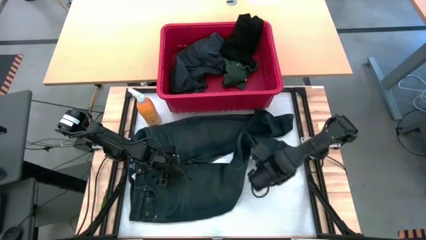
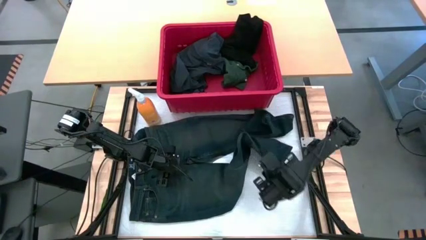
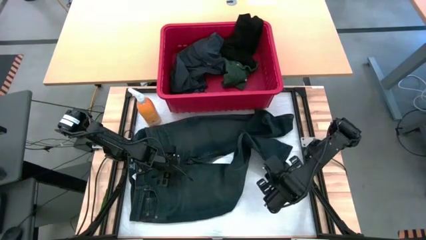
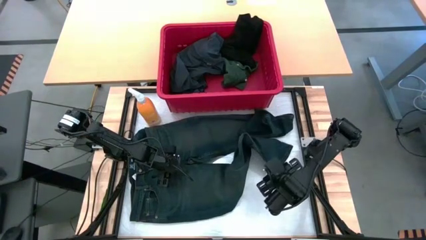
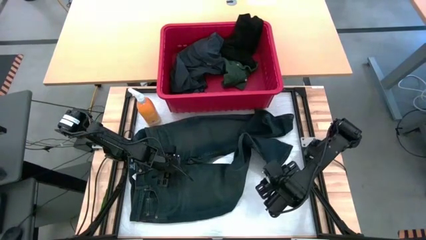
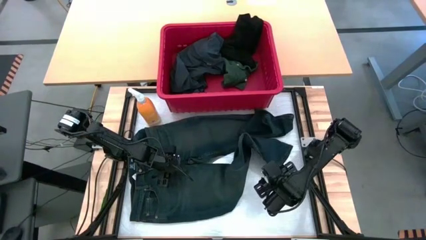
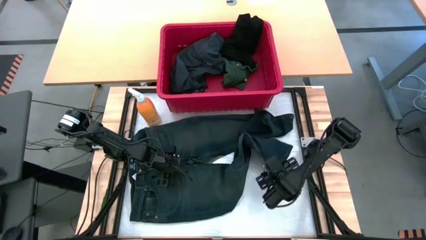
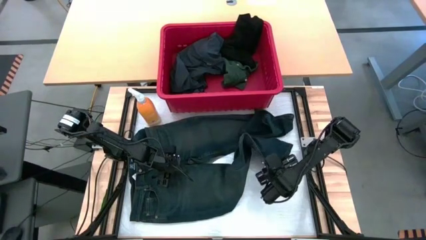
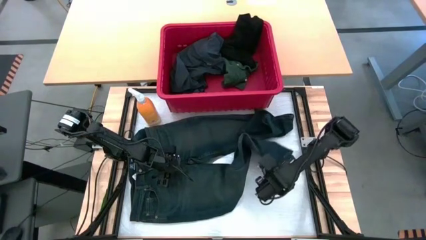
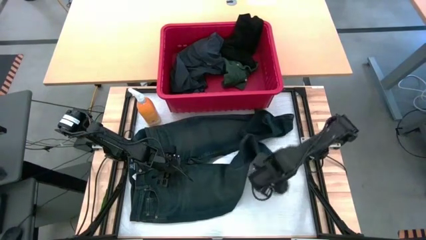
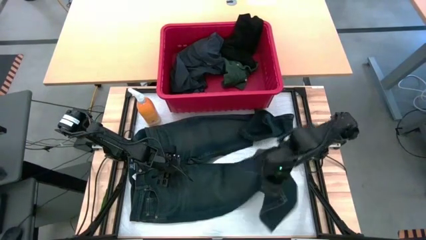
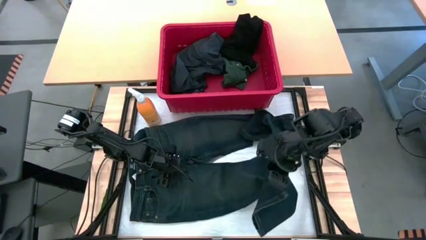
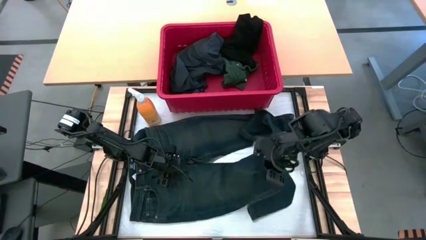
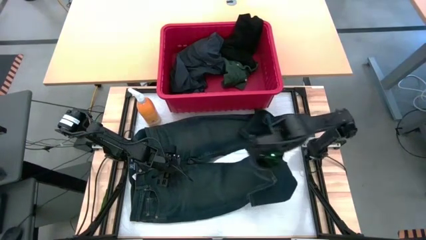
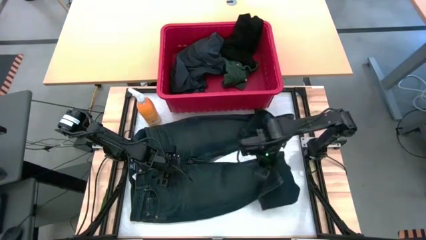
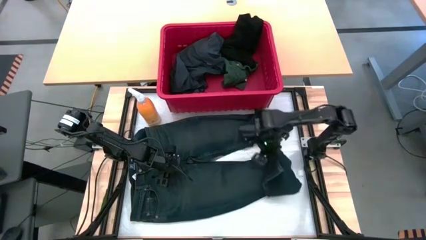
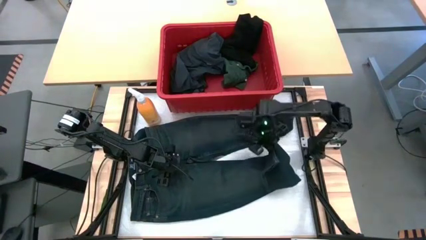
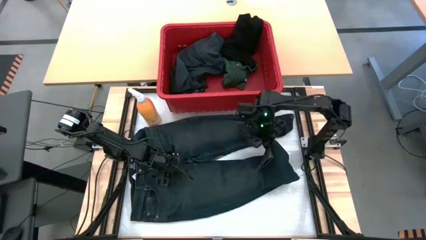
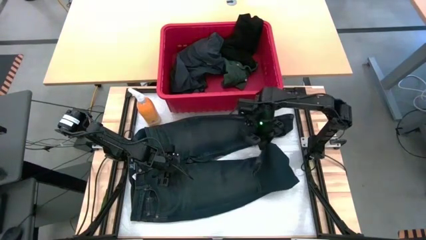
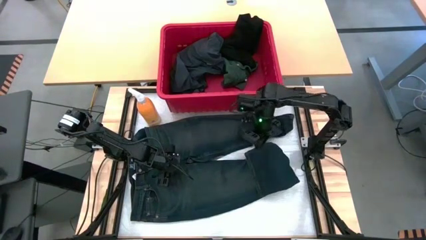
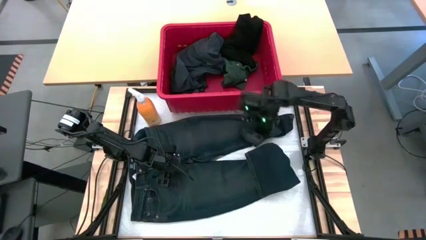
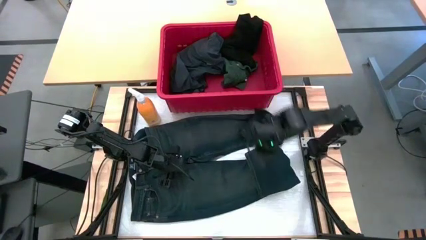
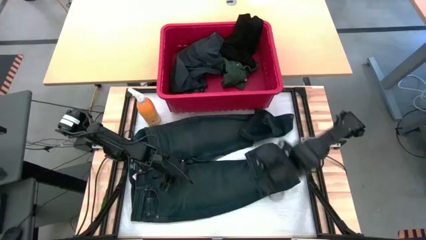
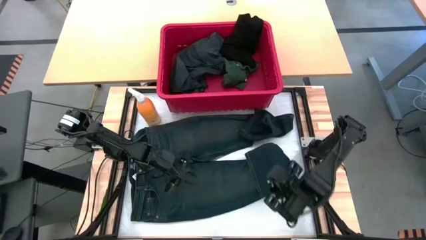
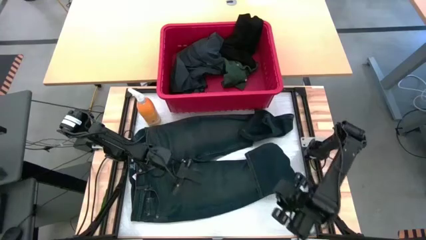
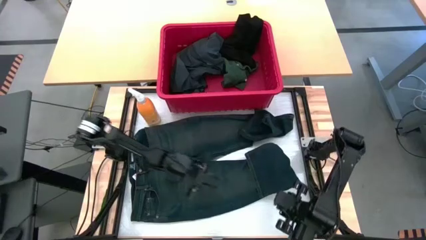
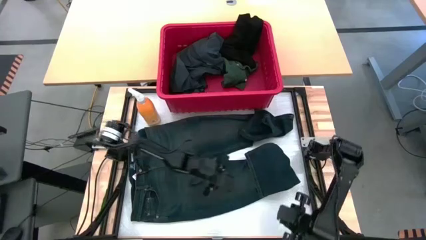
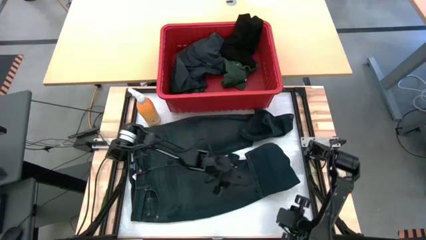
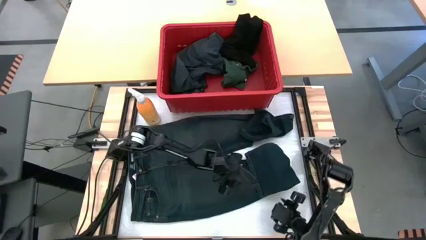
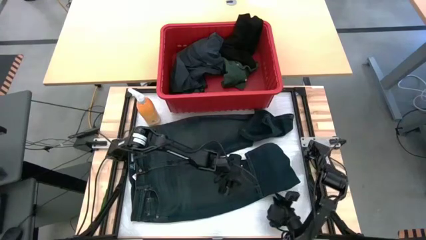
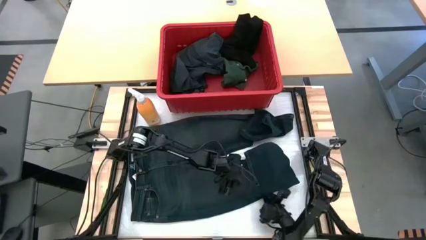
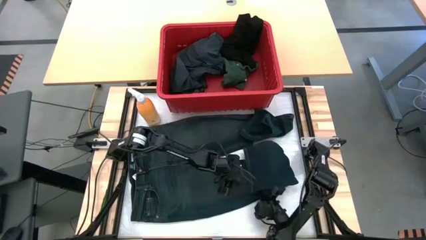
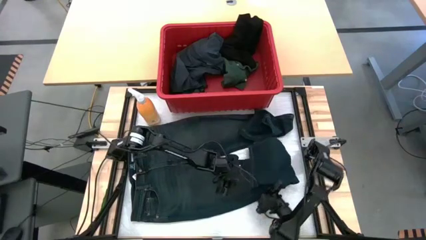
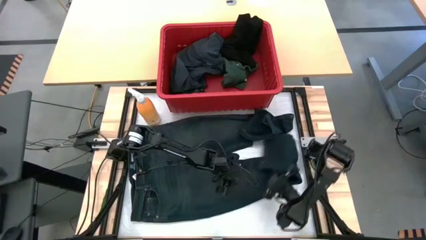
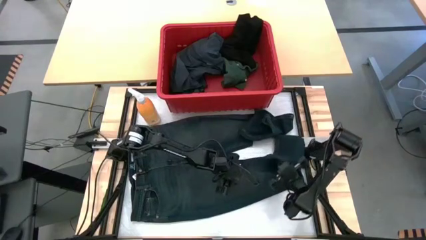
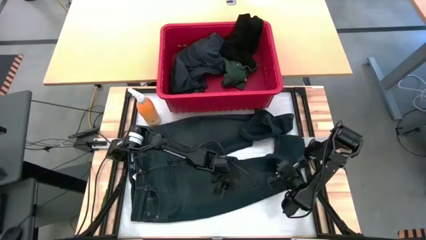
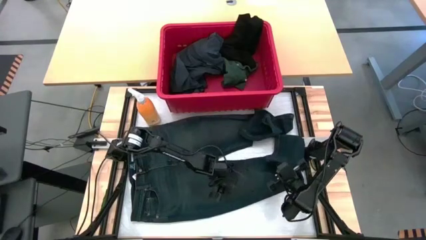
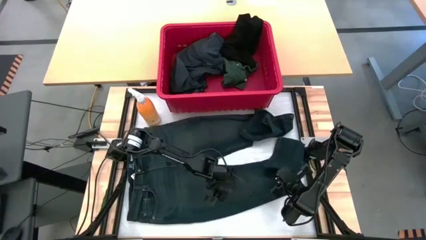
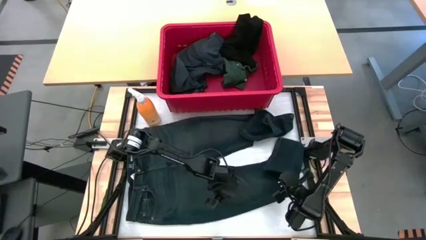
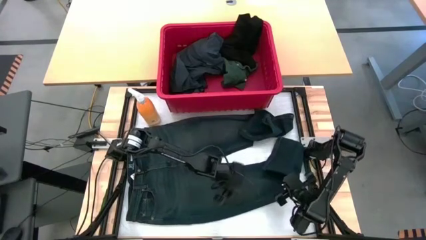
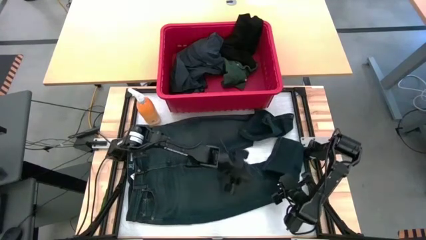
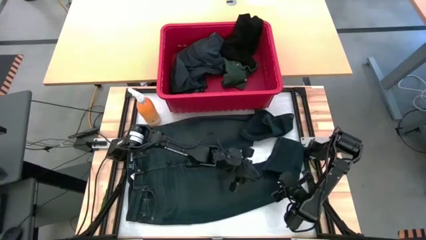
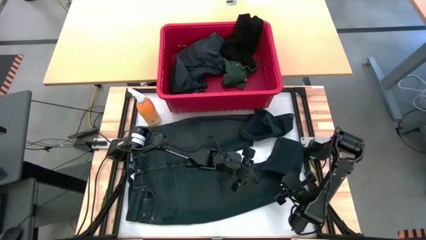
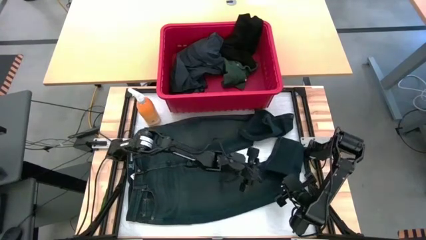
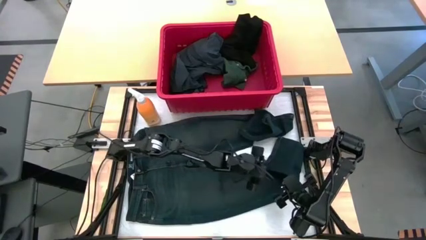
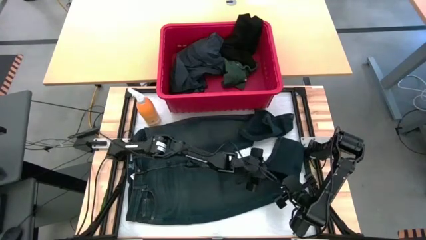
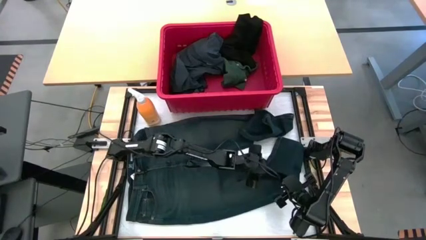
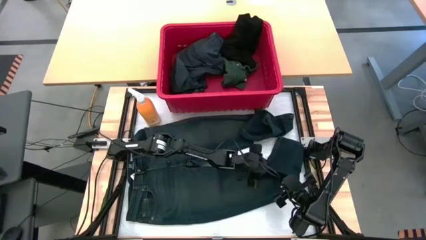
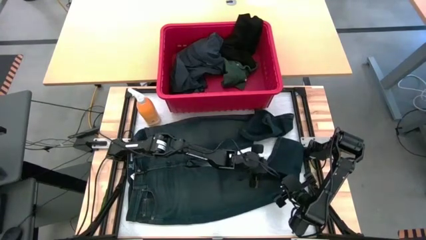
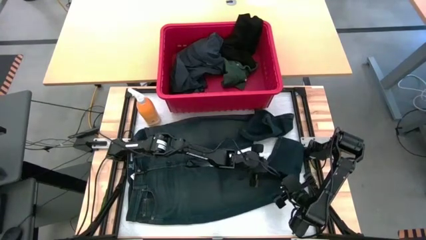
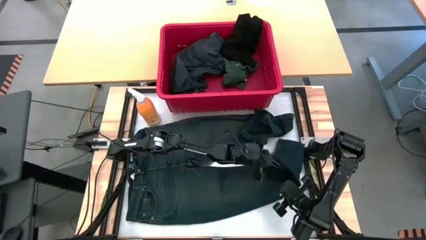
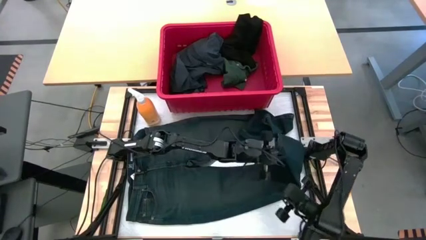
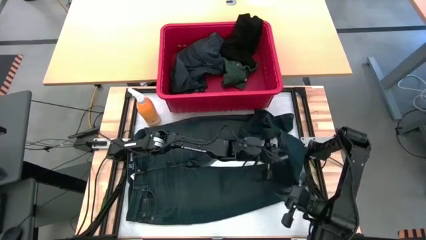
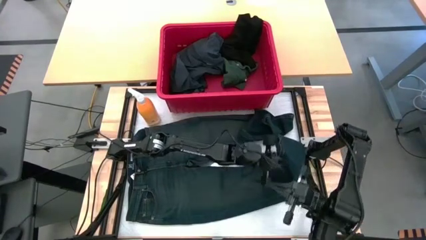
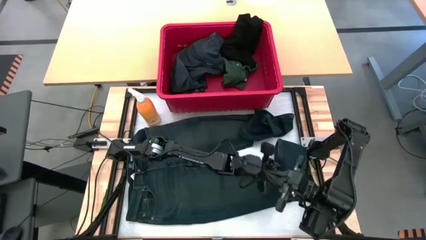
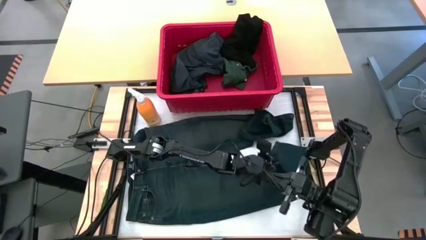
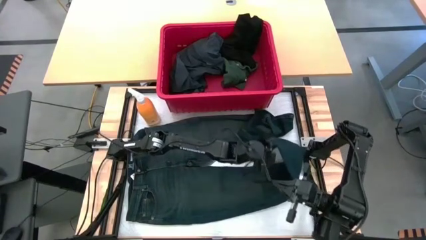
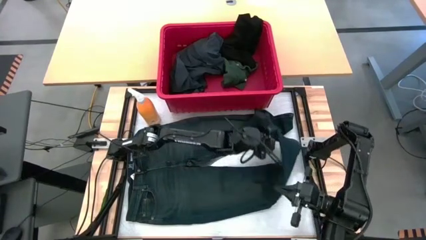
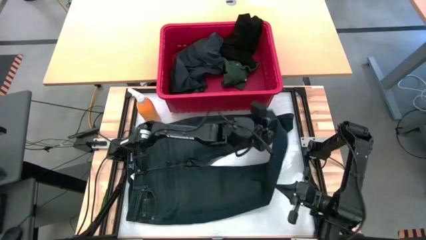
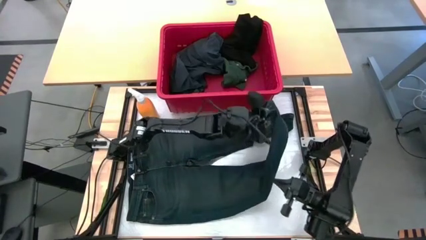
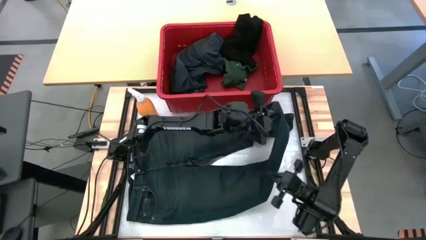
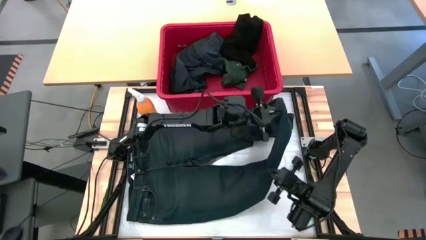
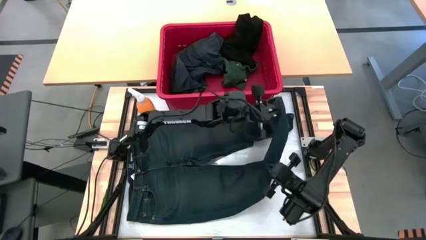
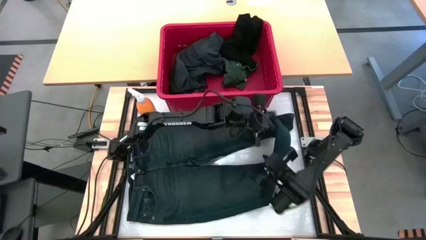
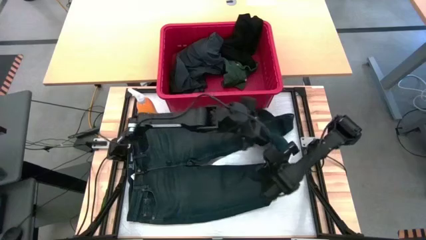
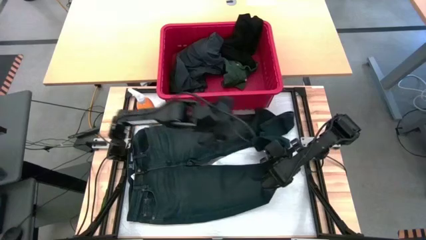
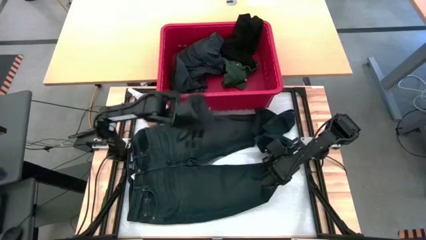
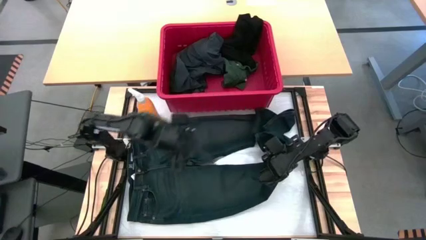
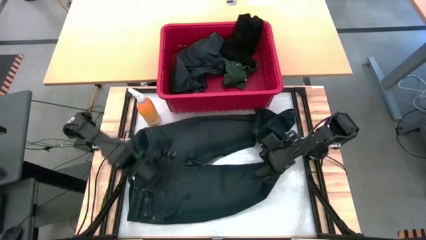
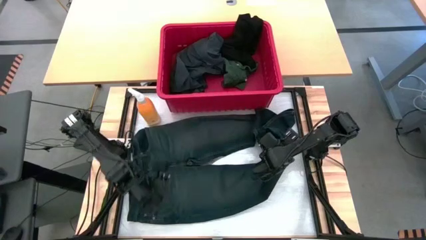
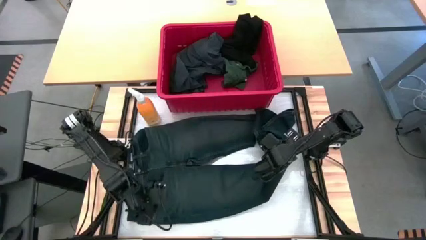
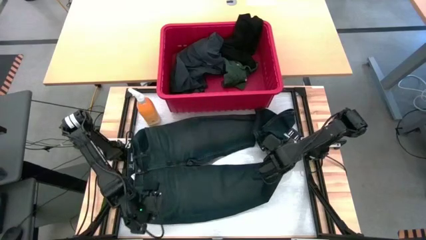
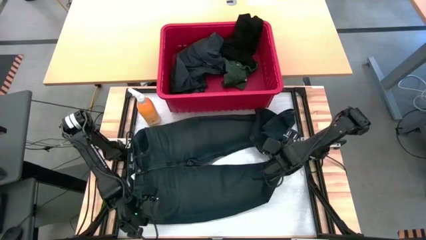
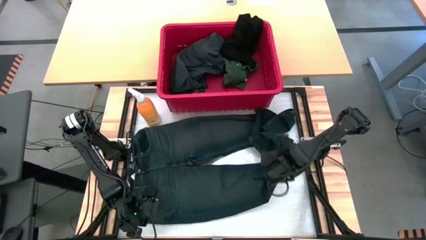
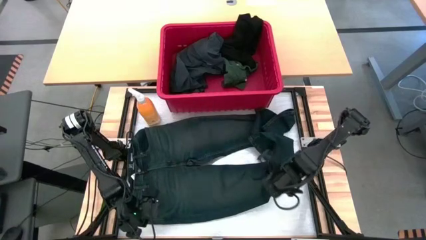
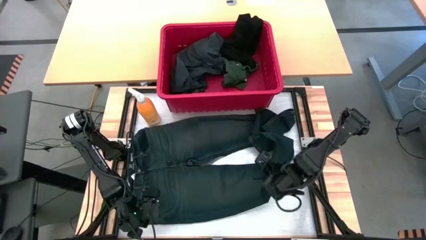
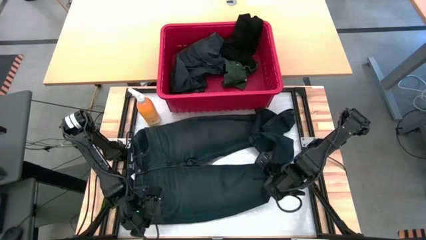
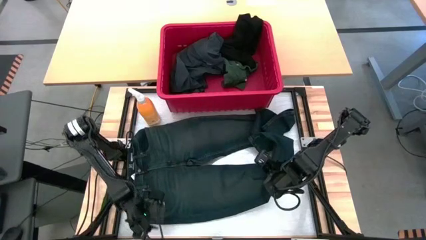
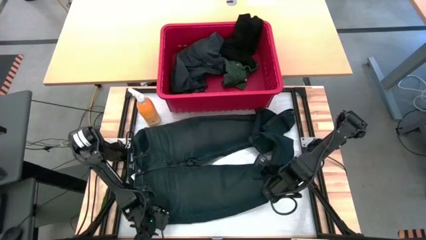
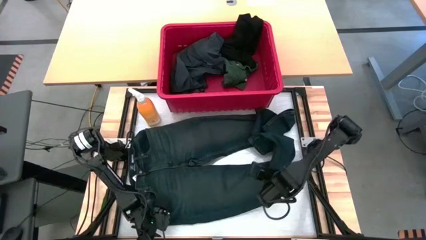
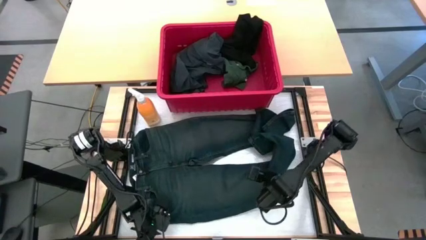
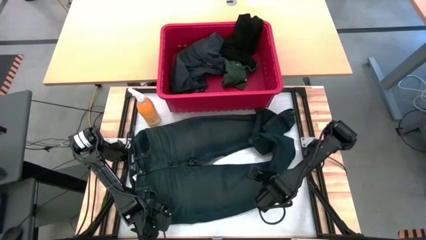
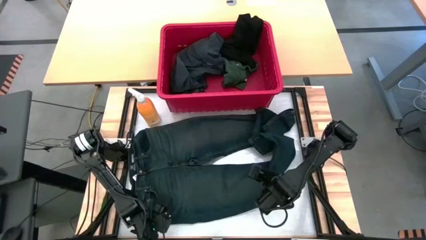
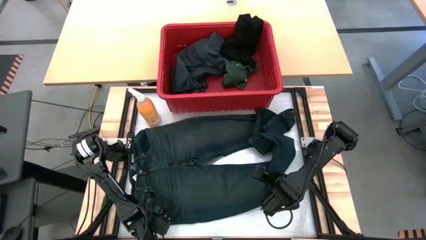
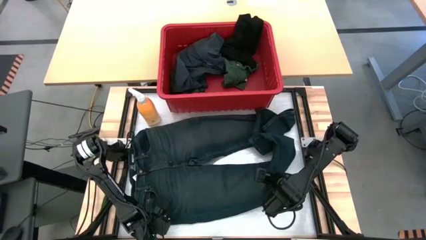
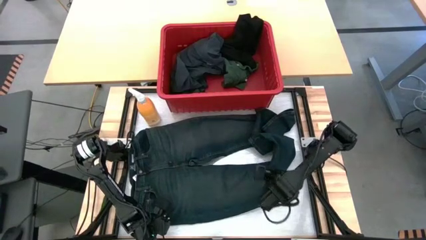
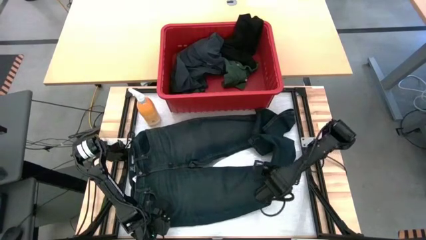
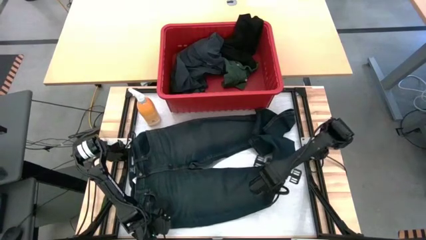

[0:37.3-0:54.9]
Task: Fold Laundry from Bin
Fold the dark blue jeans
